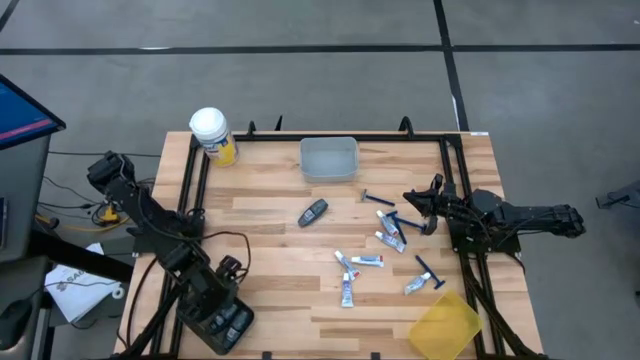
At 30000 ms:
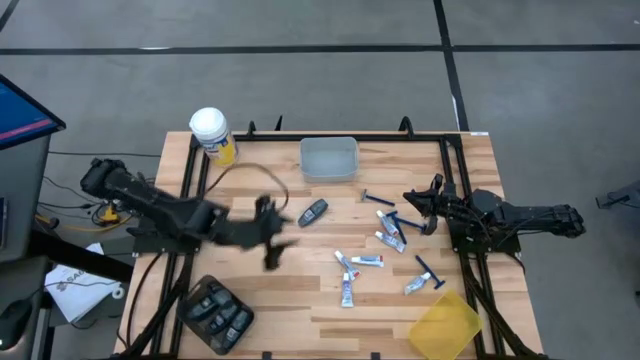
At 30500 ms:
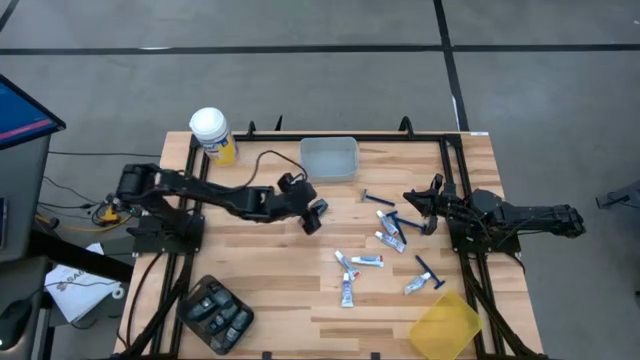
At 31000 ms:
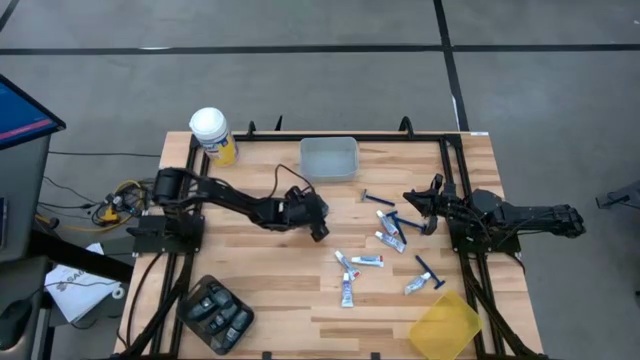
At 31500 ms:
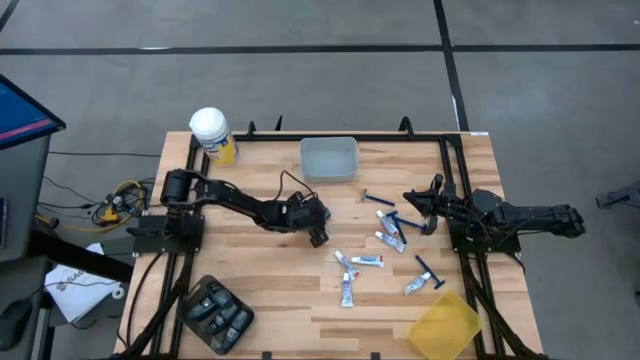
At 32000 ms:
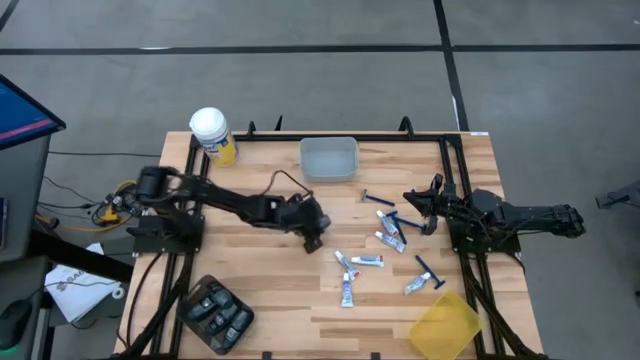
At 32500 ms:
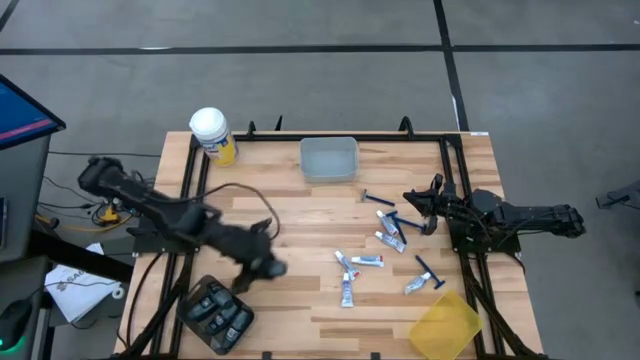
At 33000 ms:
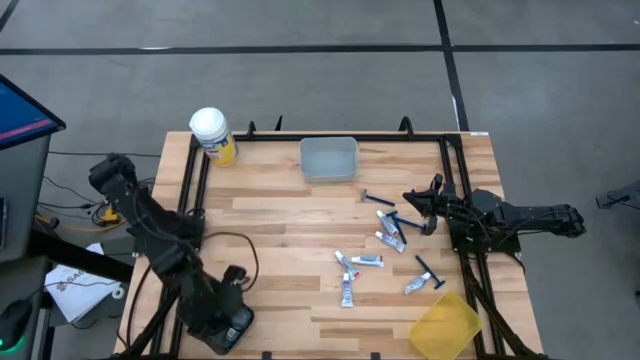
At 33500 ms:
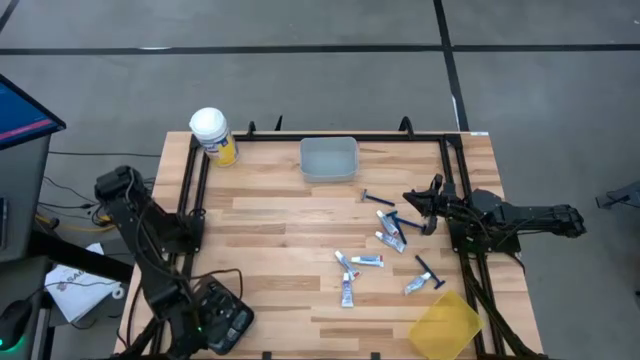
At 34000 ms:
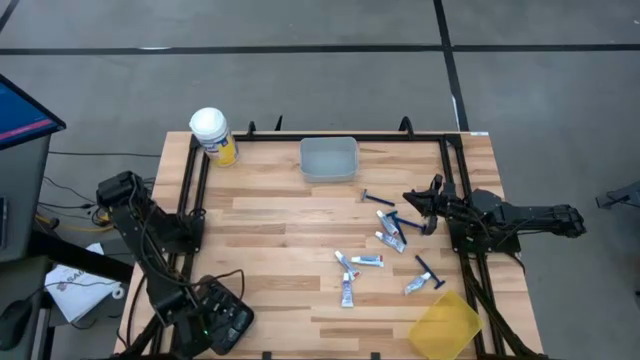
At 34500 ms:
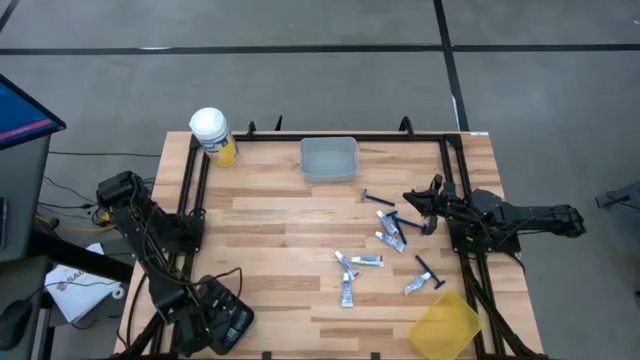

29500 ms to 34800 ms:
Task: Pick & Place Travel size toiletries
Put the black deodorant into the black bin

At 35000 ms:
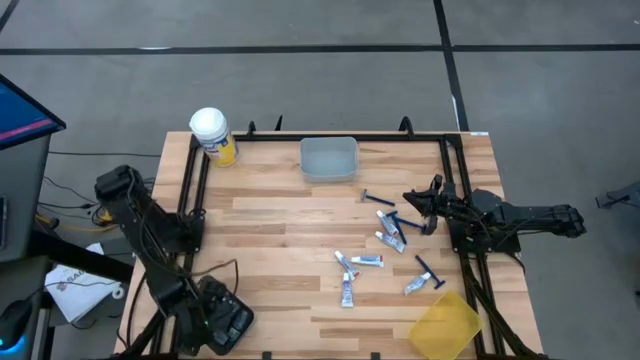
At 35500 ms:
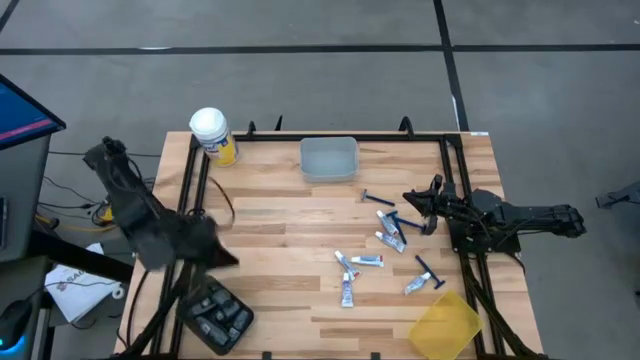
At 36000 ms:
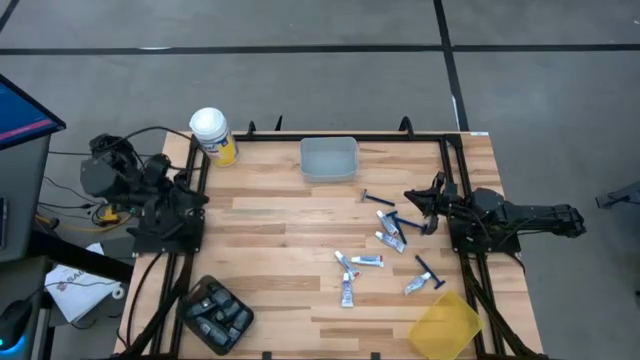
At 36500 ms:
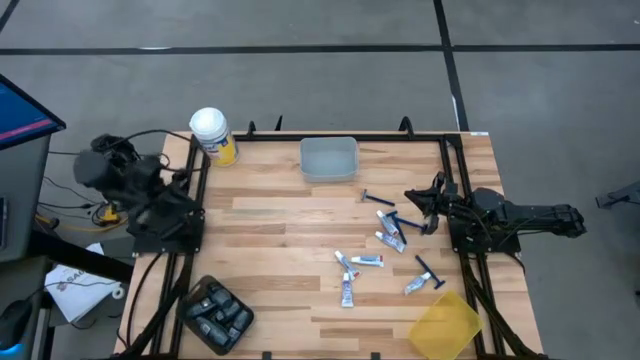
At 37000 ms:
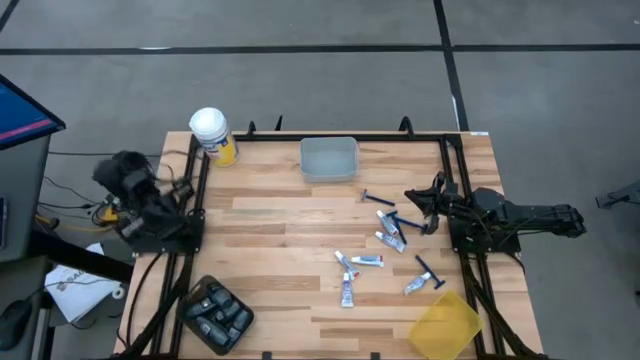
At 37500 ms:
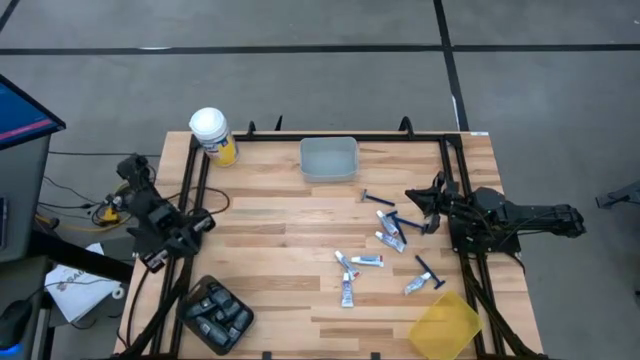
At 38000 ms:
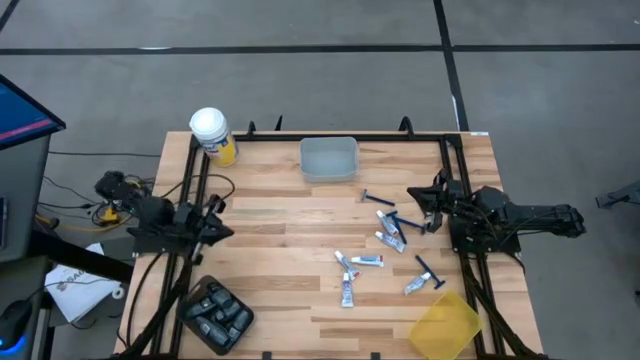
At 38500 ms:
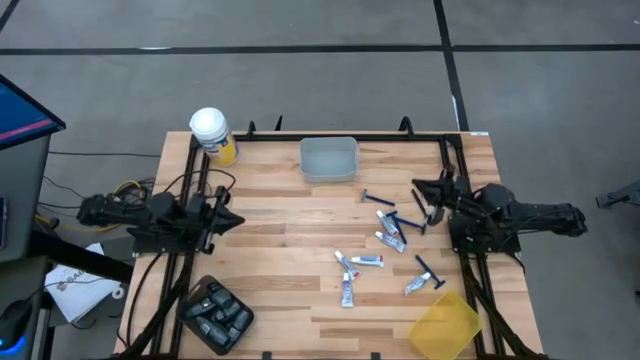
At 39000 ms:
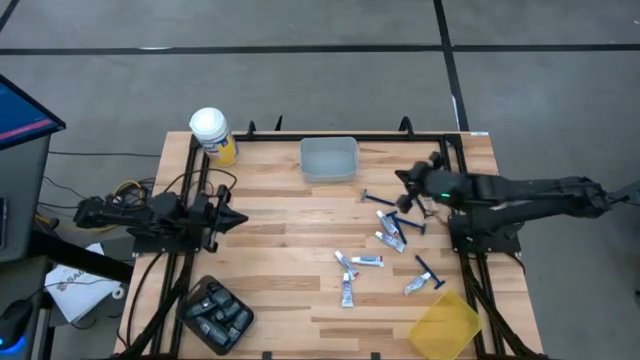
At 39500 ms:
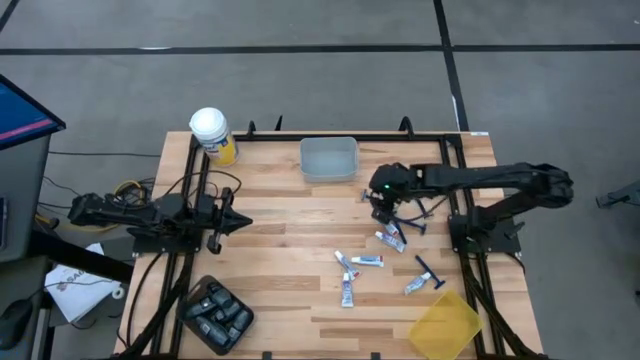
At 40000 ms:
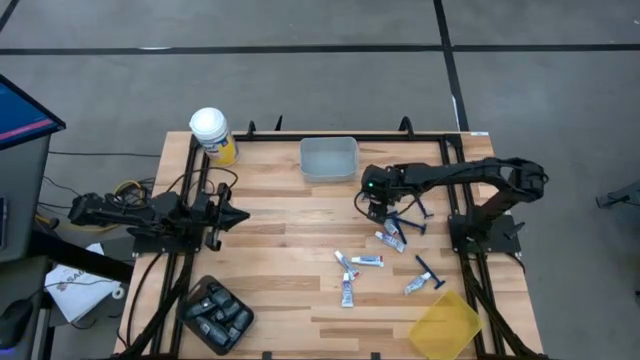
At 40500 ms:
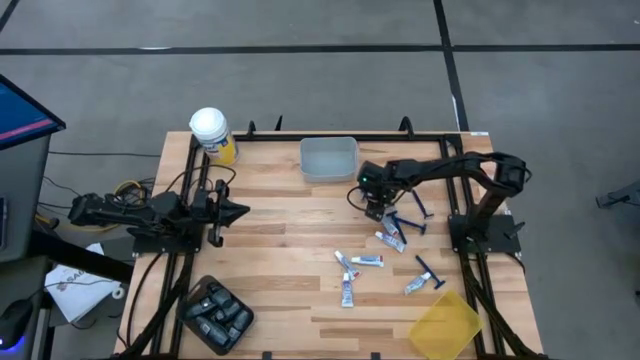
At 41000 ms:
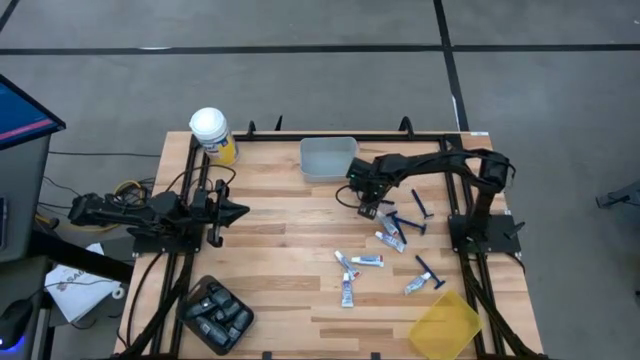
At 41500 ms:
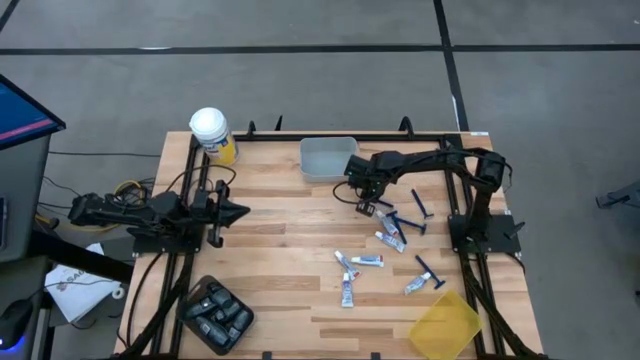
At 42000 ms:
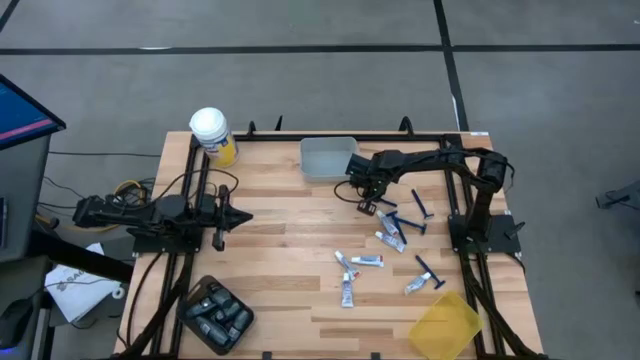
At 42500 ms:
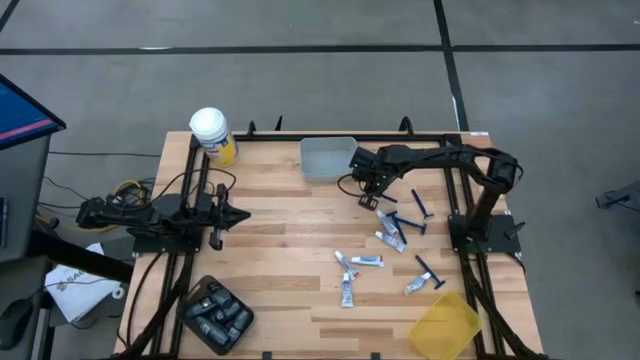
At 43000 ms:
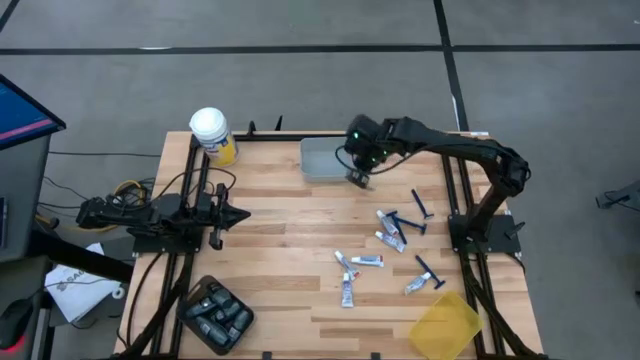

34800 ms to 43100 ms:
Put the blue razor into the gray bin

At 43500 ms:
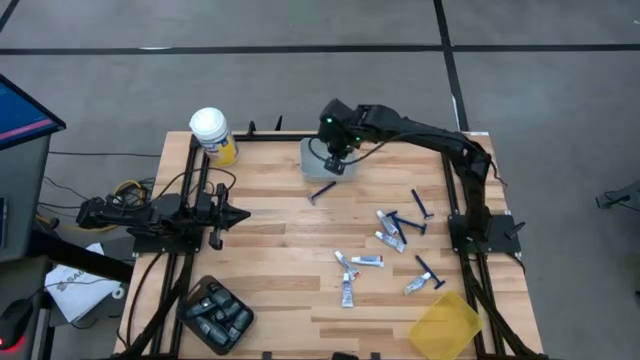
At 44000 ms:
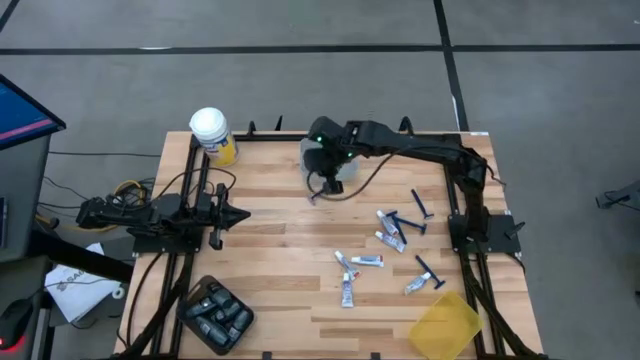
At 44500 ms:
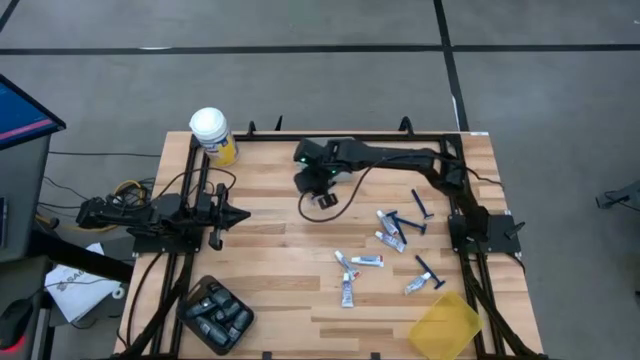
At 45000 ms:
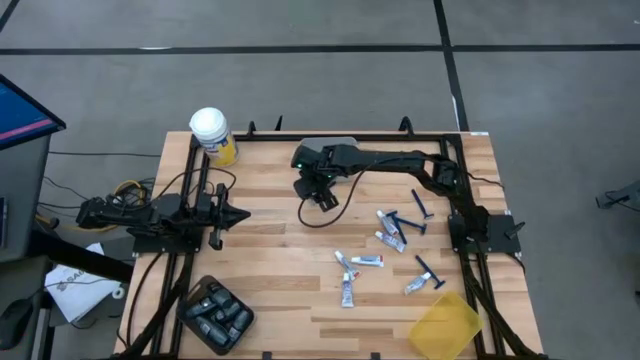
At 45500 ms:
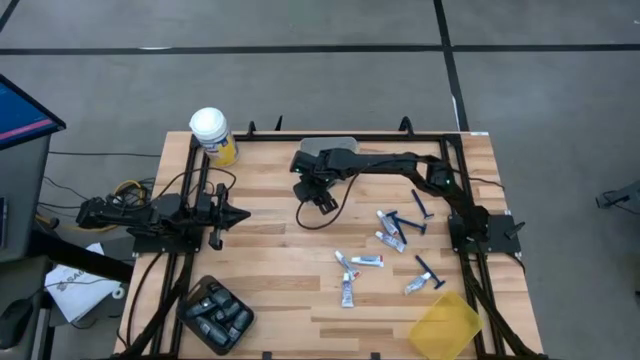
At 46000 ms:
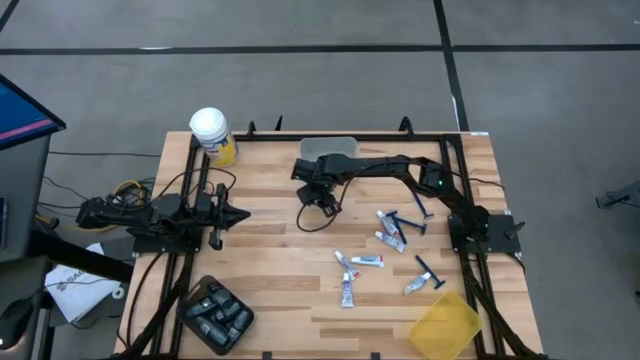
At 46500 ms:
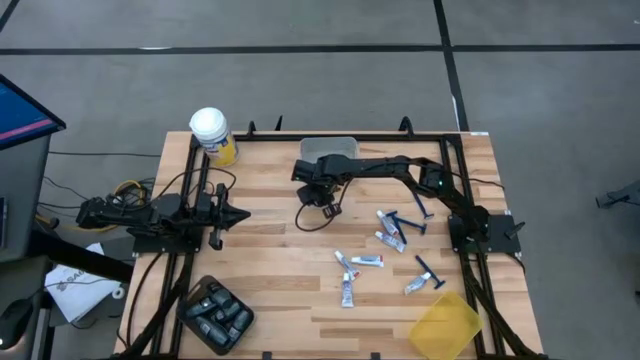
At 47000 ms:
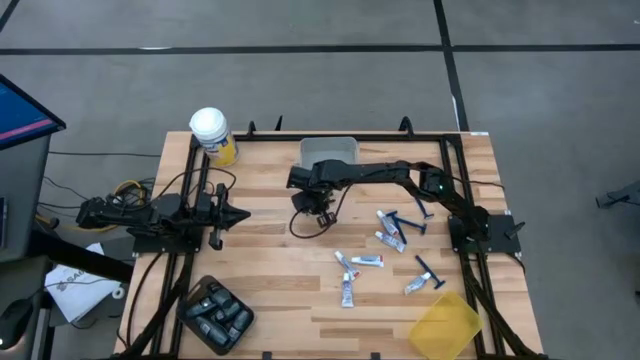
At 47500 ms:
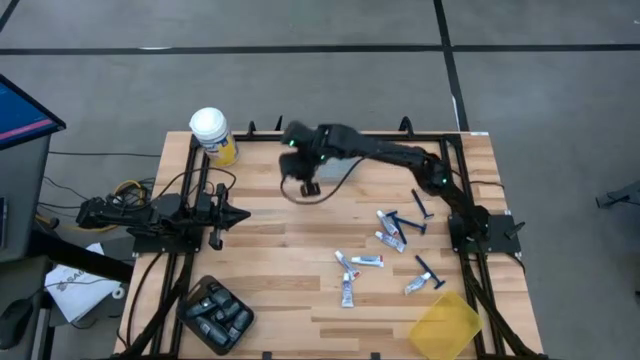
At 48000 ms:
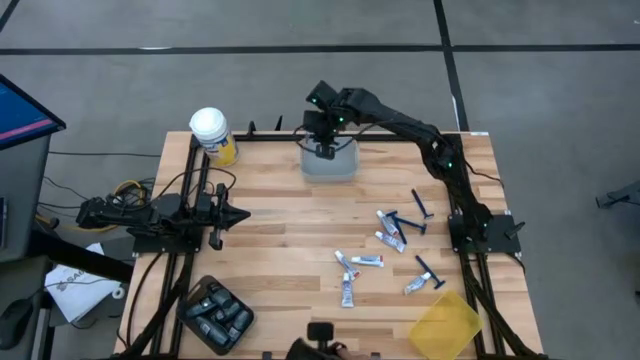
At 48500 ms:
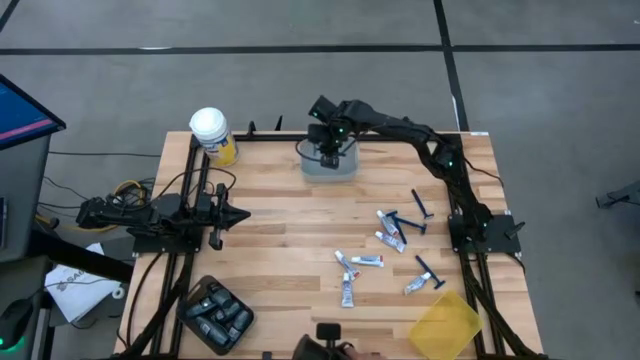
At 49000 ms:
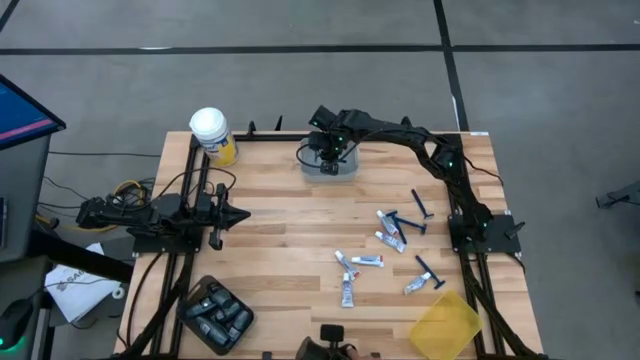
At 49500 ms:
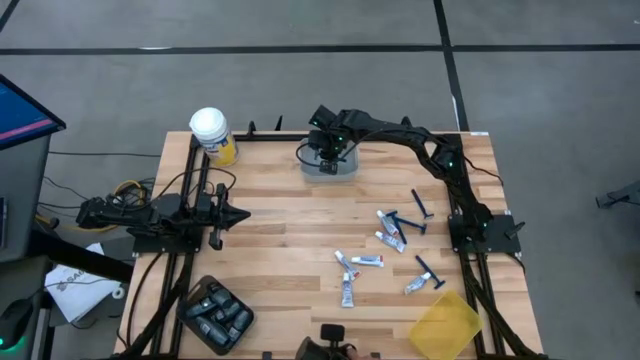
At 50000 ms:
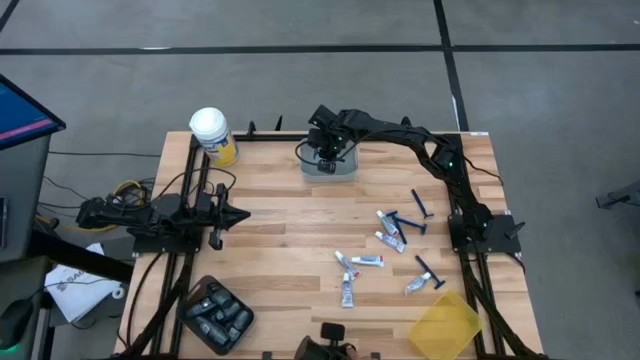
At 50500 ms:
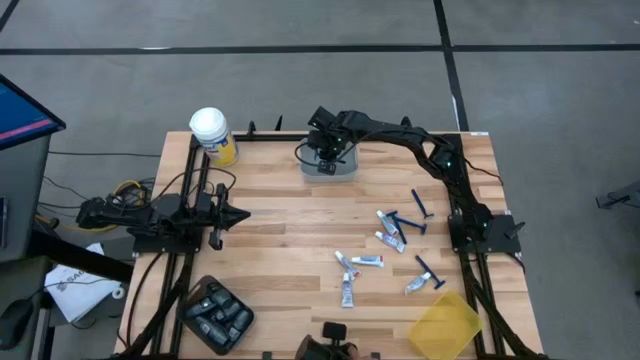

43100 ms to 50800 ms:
Put the blue razor into the gray bin
